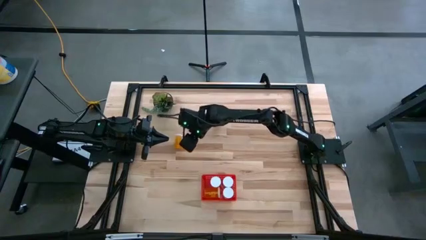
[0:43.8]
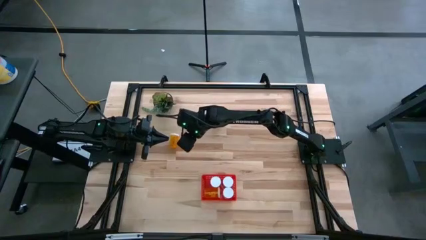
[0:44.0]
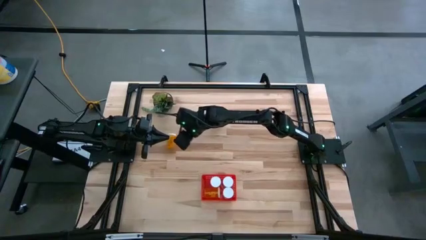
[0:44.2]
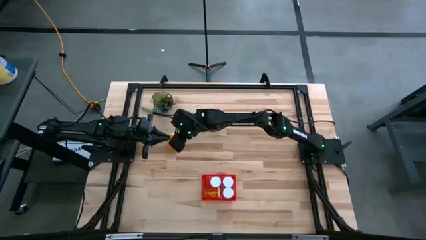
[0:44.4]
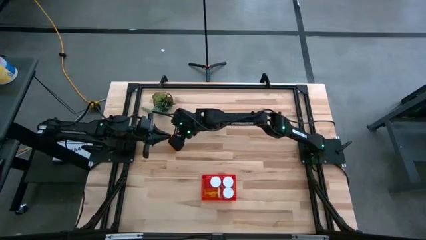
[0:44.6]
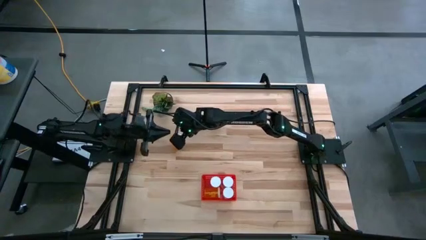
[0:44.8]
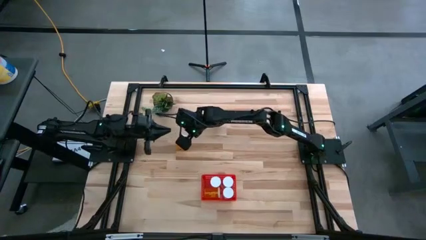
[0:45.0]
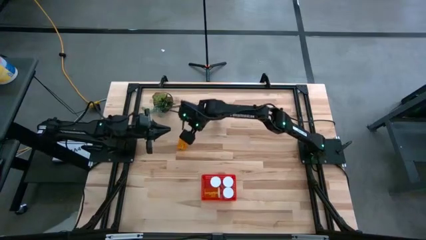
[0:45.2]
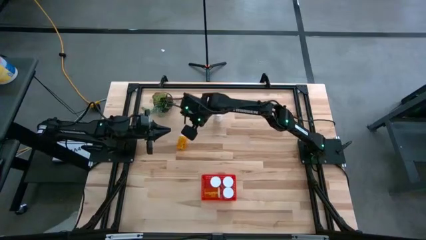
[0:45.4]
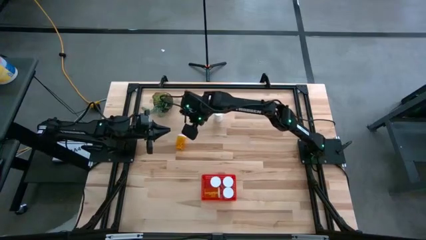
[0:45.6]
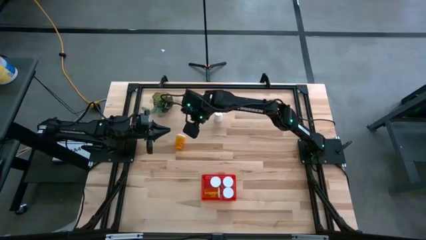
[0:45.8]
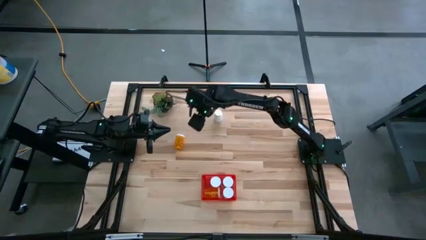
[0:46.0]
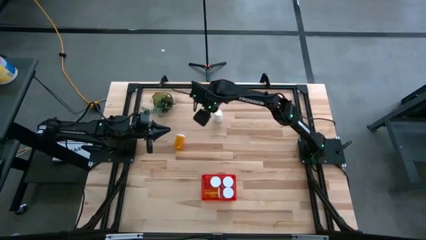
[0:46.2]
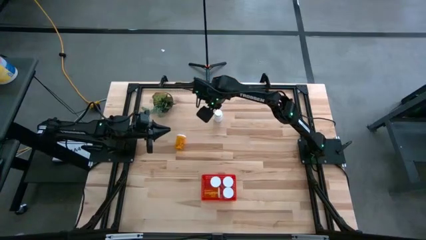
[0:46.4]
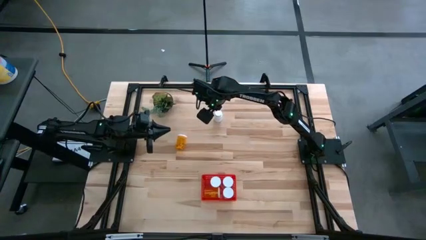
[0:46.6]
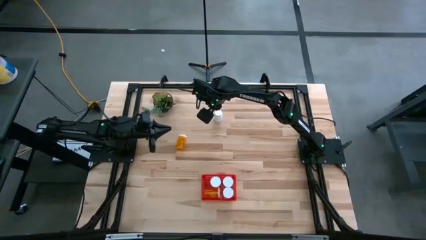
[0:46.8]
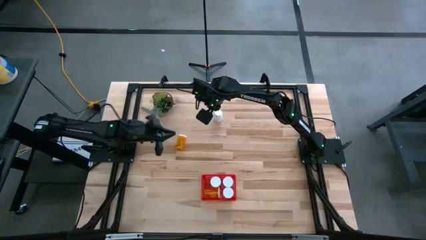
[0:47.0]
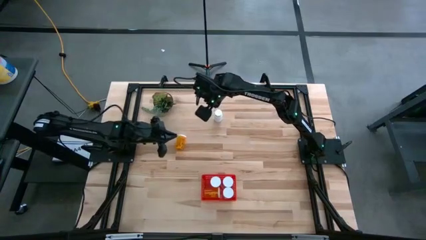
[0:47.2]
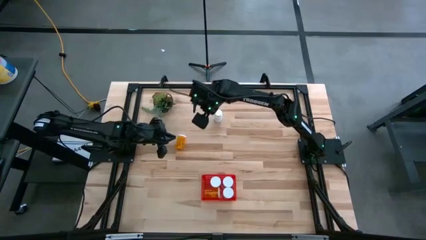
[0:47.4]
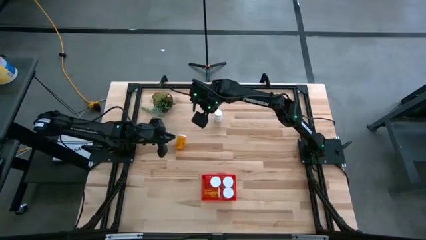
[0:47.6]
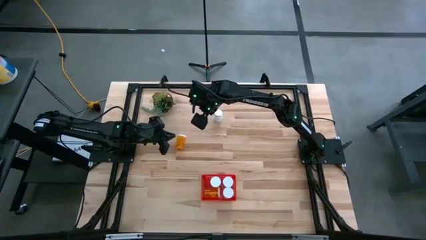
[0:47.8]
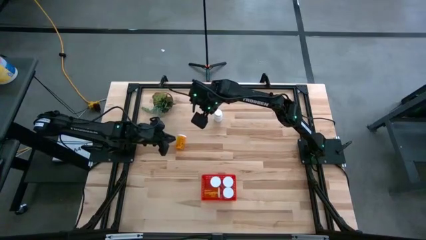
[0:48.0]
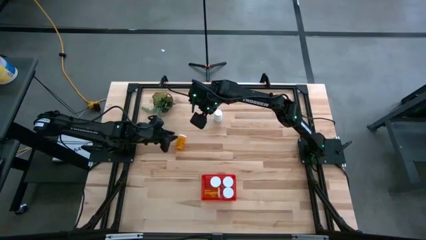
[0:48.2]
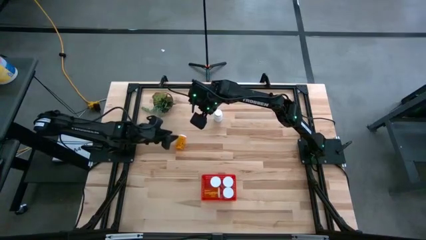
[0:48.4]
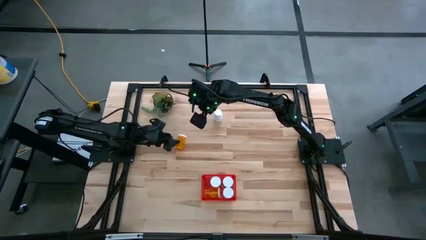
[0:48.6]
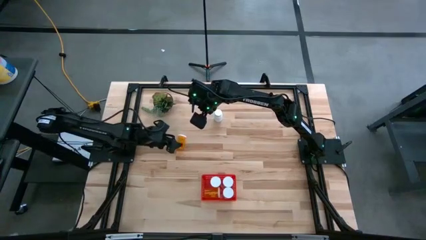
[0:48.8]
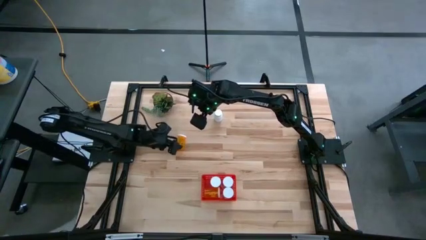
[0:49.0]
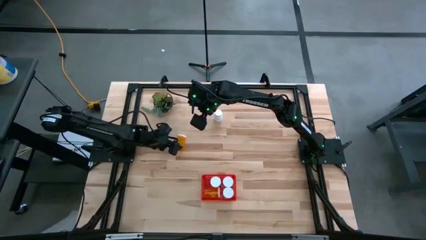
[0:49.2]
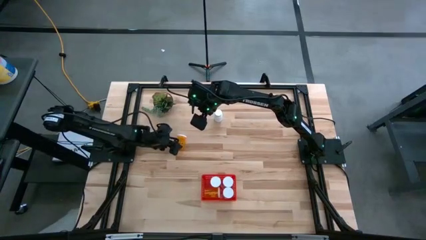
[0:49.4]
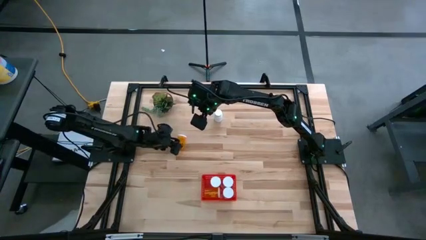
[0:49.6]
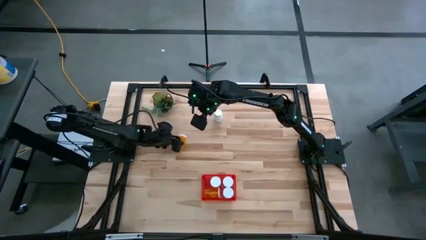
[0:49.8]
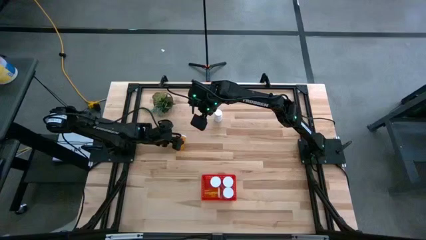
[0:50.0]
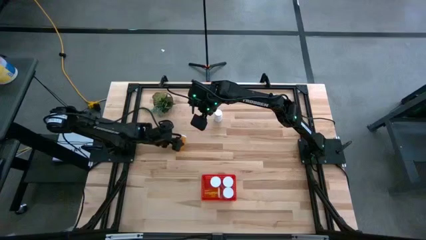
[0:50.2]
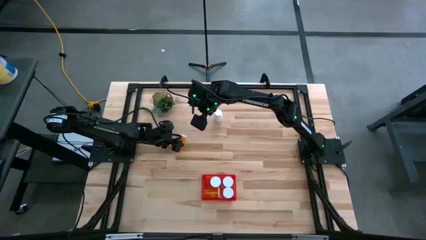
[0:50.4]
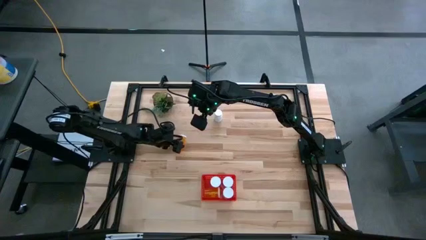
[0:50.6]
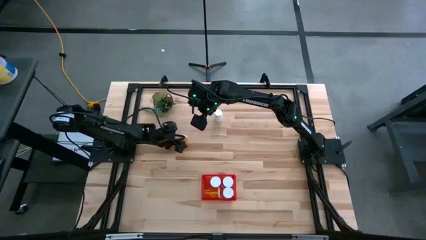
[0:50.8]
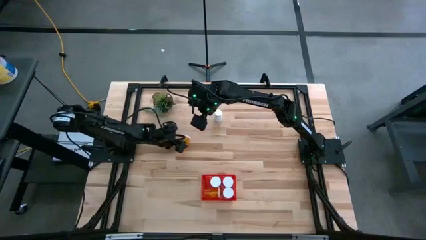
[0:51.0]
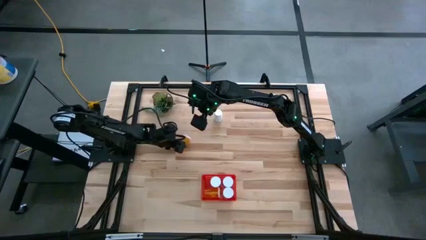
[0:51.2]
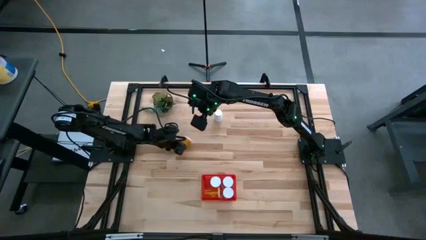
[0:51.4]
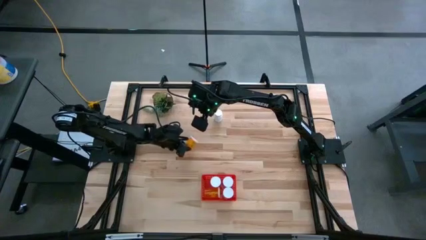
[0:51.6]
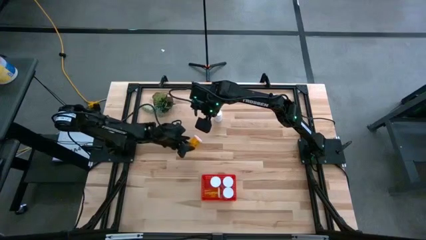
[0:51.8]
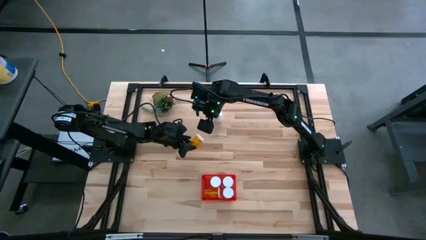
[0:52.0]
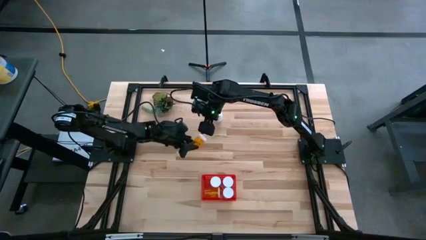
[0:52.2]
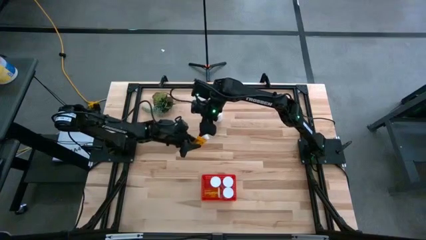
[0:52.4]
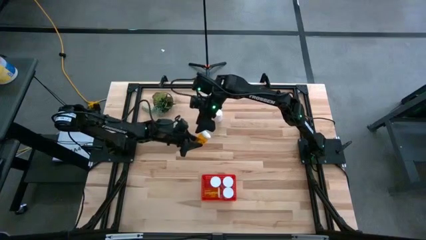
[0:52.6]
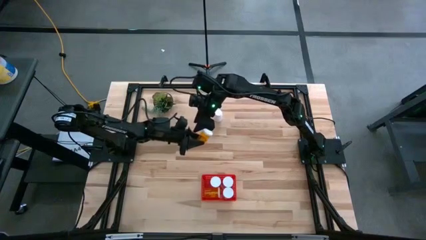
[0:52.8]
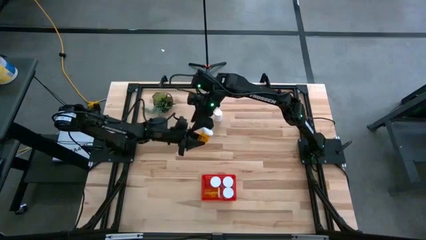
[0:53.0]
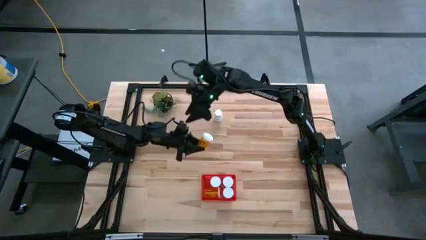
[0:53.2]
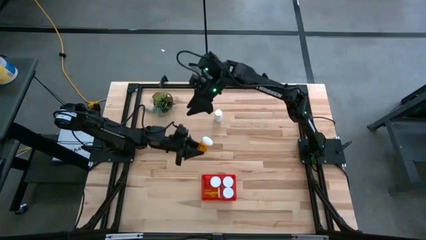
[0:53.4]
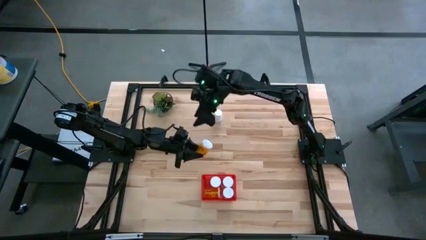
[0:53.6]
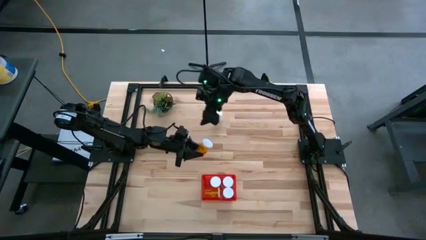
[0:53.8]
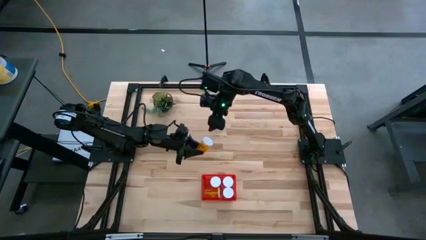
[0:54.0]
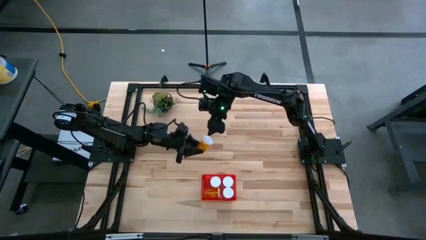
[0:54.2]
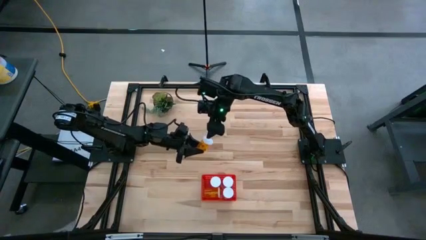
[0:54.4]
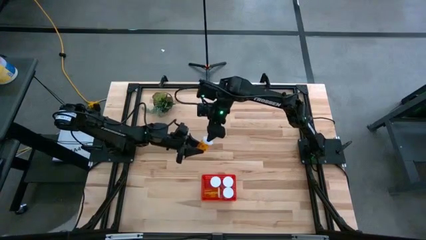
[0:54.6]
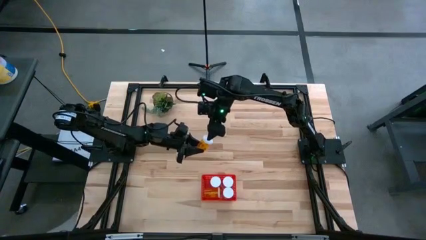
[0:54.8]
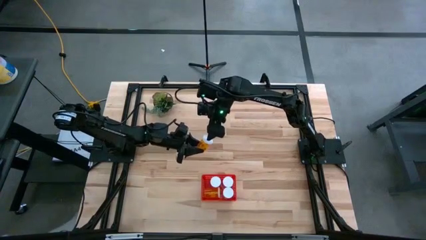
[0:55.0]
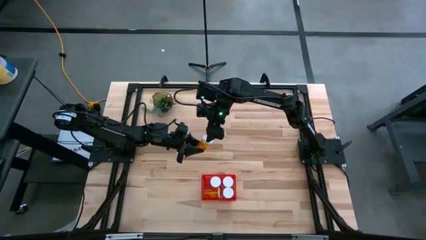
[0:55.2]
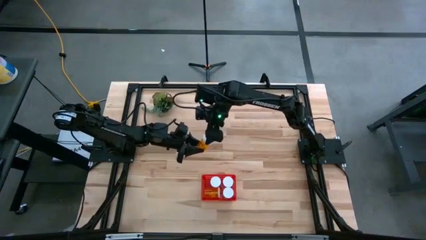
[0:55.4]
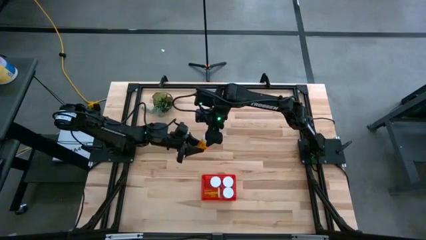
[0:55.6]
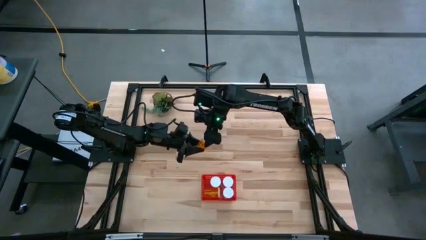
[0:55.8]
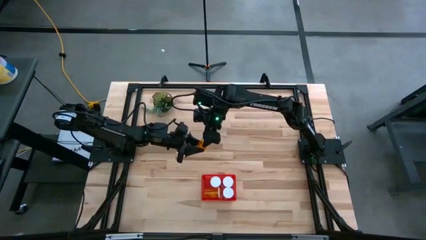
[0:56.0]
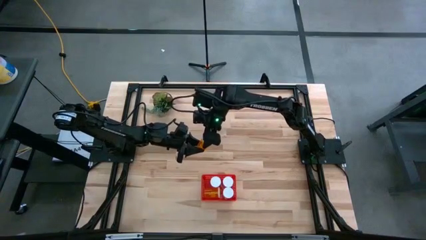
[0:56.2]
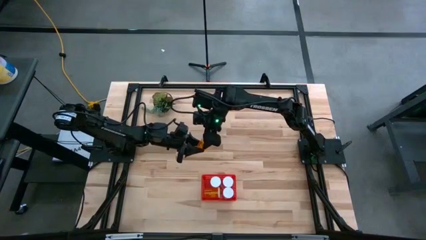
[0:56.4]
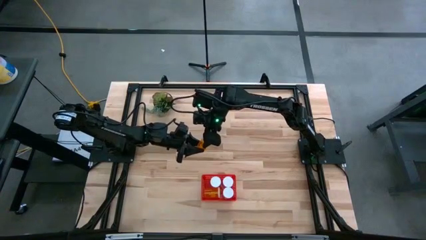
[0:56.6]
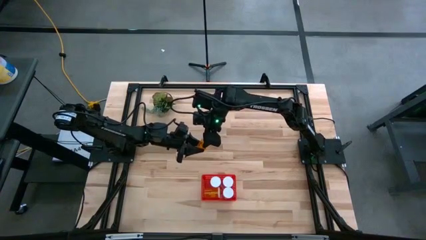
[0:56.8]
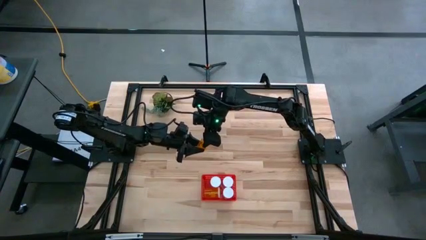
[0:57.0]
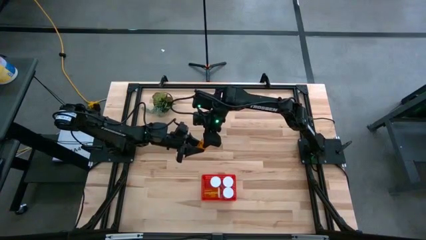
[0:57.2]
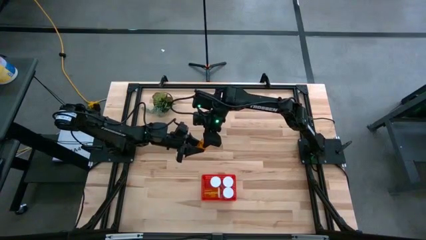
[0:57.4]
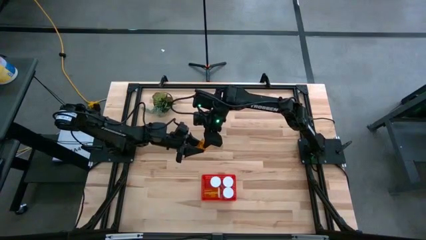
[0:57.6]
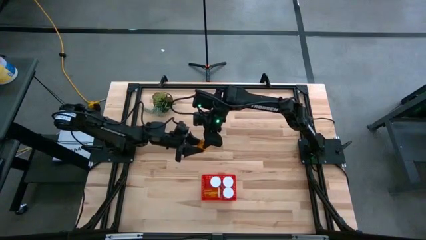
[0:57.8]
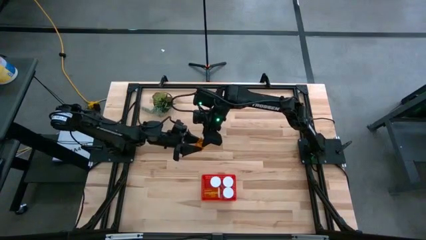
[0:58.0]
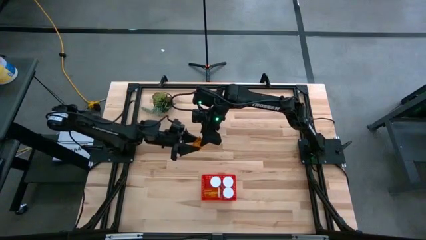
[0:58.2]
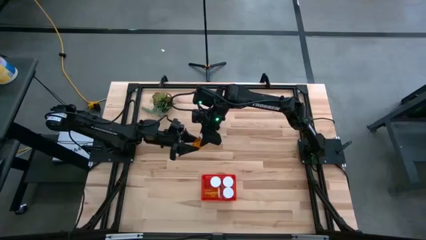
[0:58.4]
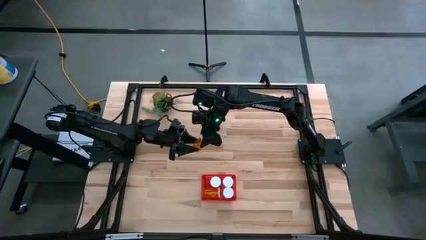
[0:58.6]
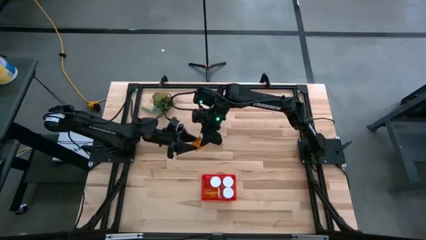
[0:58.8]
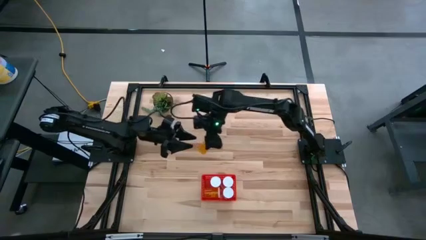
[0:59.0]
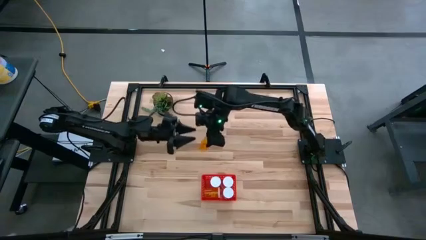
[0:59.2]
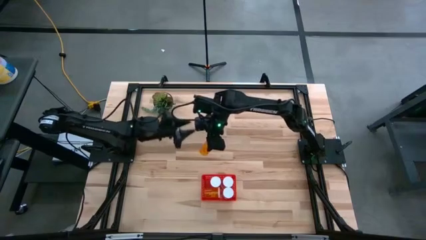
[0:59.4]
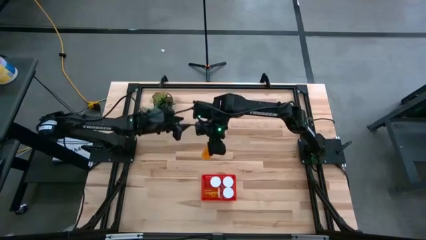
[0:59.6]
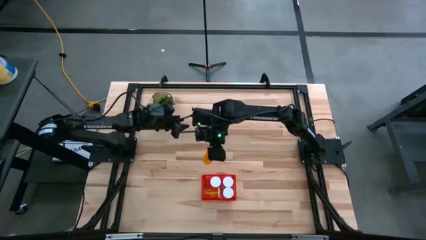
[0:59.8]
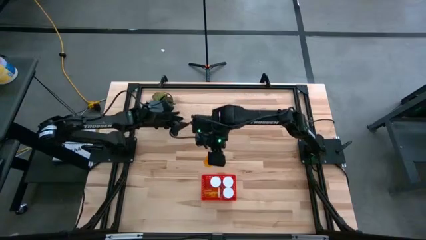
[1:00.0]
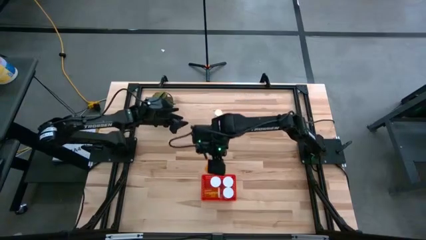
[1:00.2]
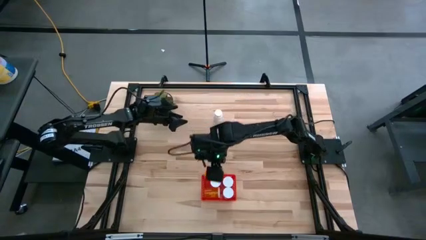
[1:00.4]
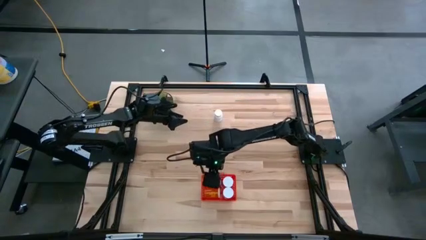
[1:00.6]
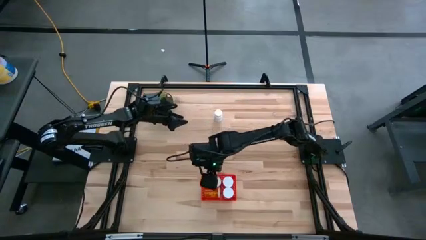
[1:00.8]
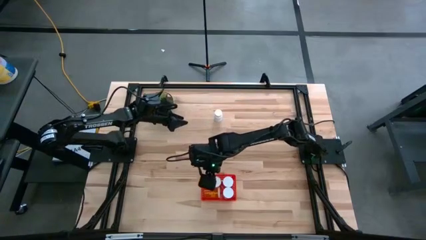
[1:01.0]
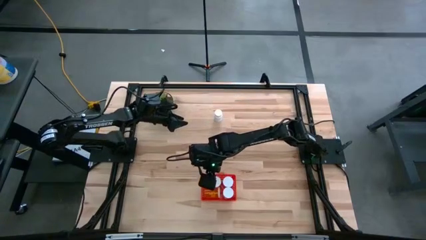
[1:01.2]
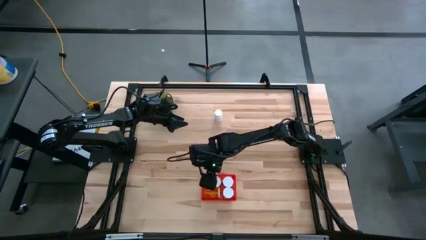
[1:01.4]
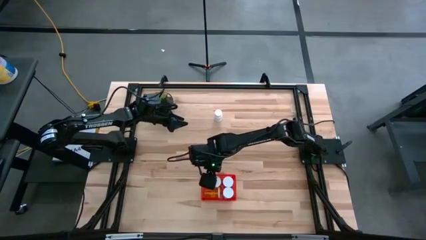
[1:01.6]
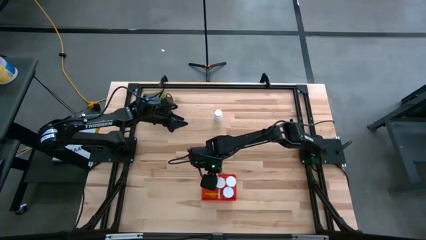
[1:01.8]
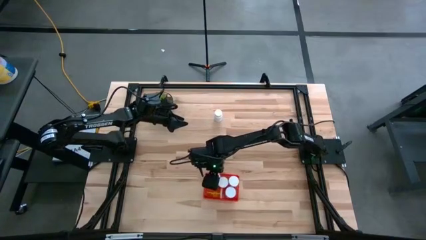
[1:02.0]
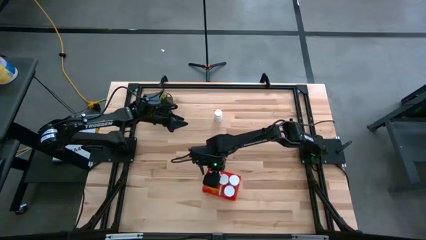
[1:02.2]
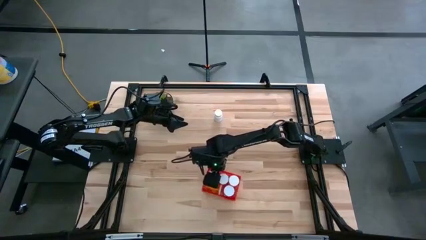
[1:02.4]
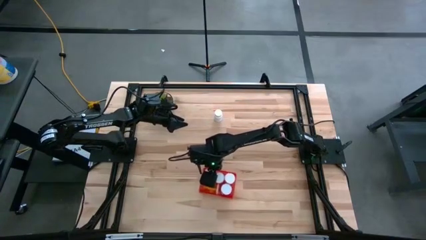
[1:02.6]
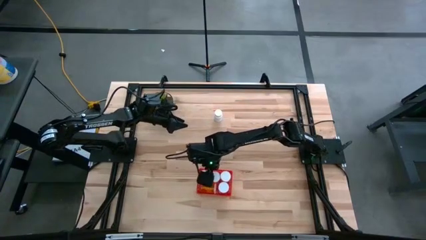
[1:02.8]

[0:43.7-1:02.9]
Task: Pick and place pill bottles into a basket
Put the orange pill bottle into the red bin
